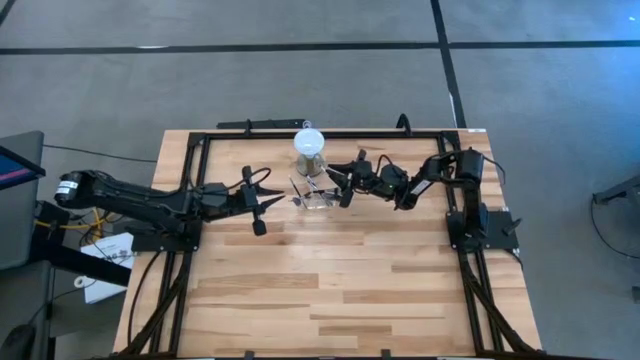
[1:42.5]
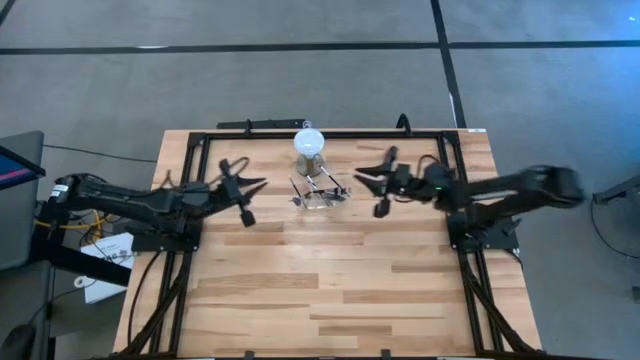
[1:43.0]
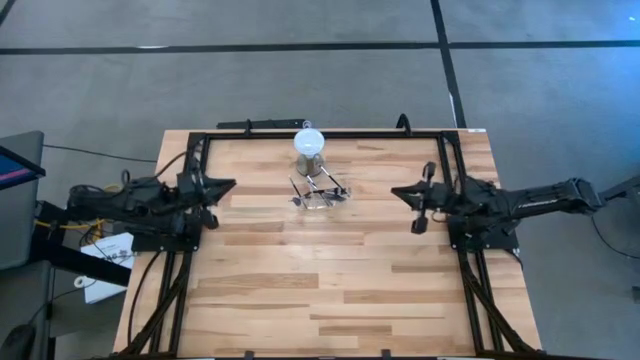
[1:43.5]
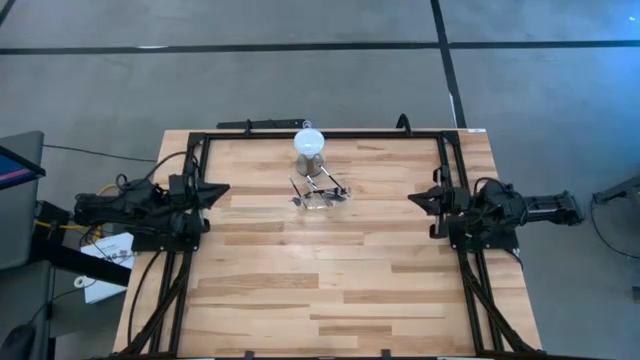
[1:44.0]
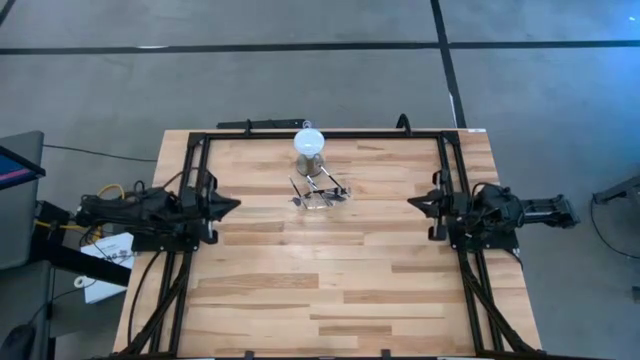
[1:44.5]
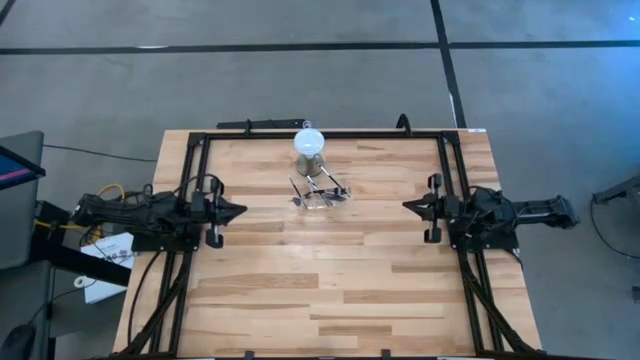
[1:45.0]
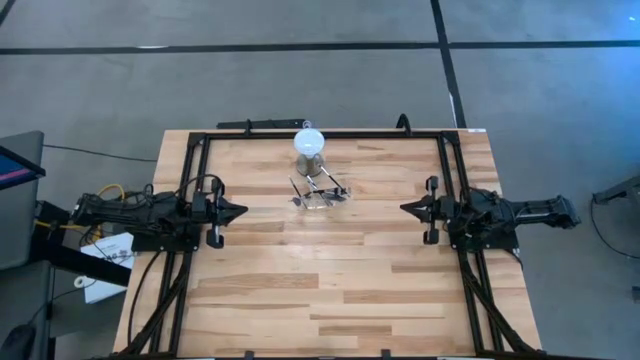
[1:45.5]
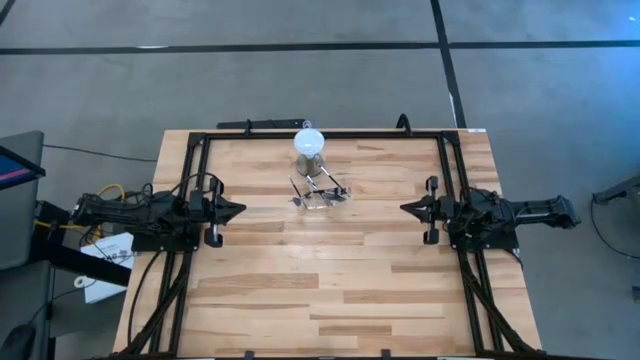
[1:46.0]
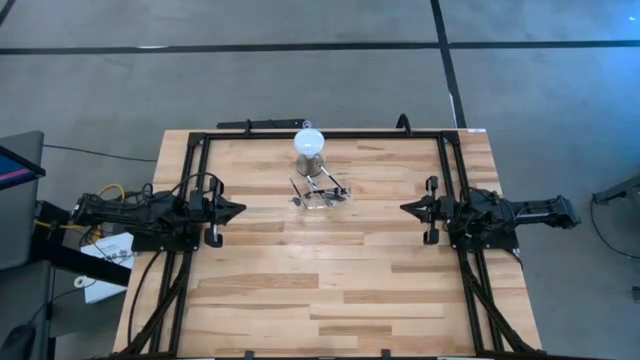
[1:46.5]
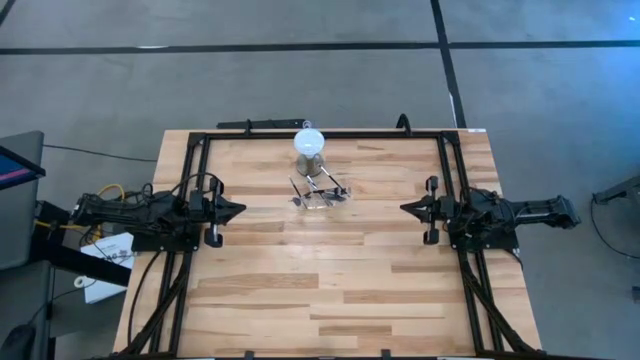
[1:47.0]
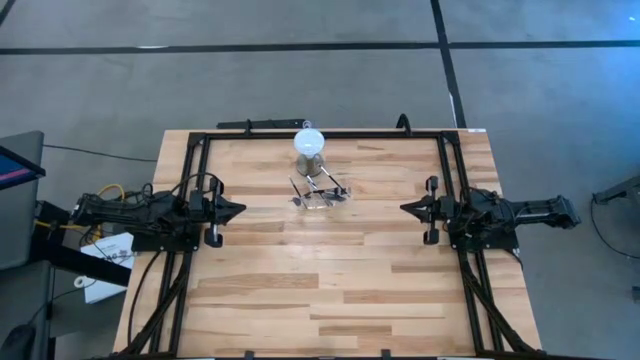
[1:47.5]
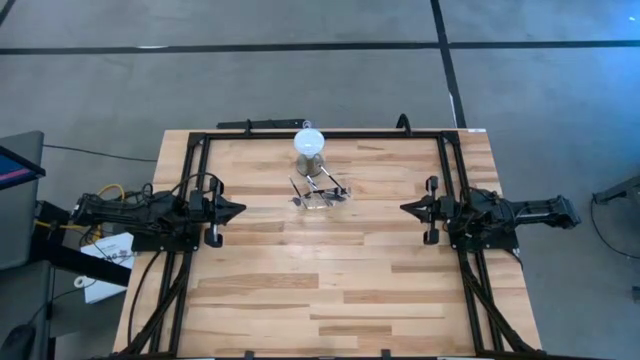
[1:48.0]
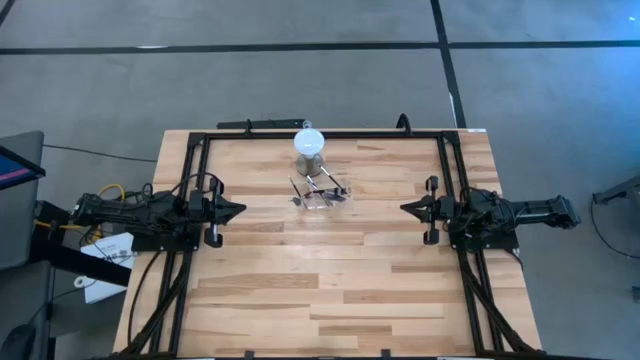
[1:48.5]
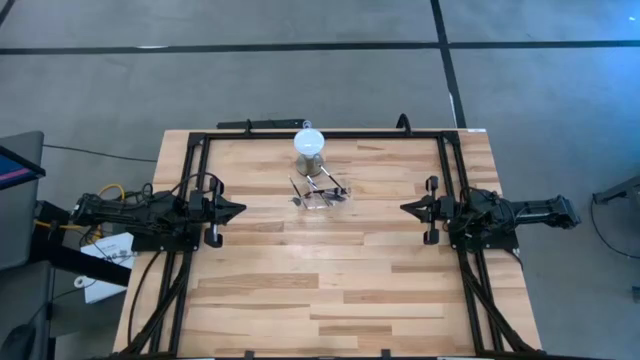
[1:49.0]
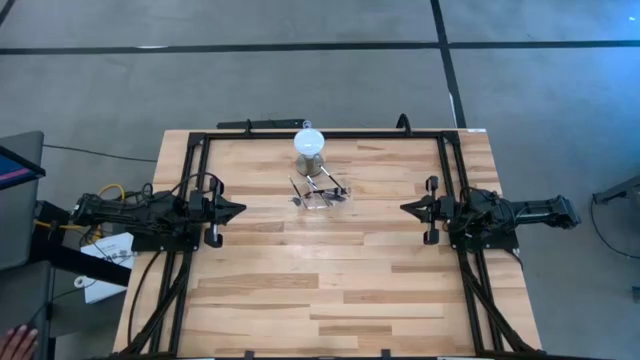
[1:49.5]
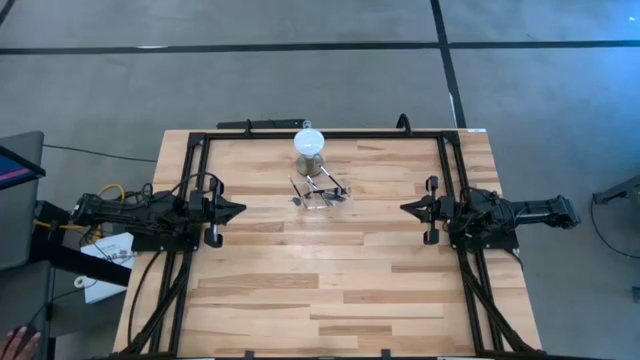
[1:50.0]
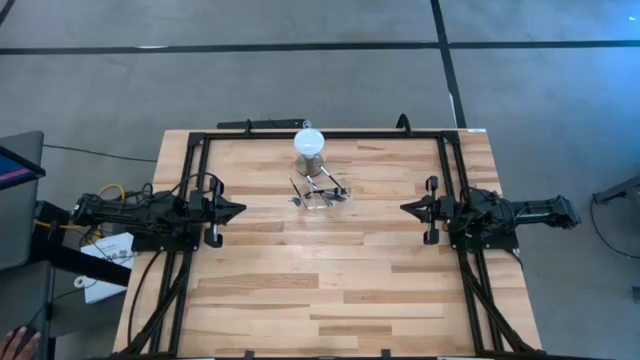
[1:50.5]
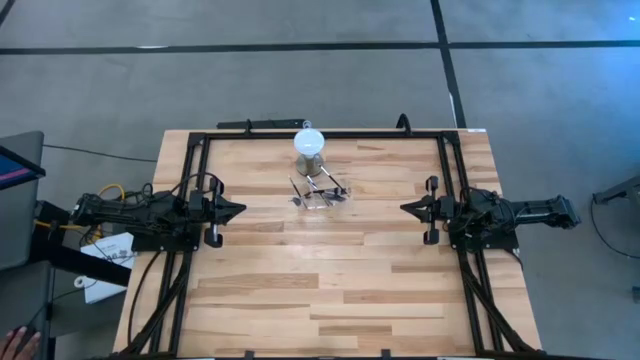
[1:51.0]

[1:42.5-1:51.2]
Task: Put items in baskets/containers
Return to Home Position

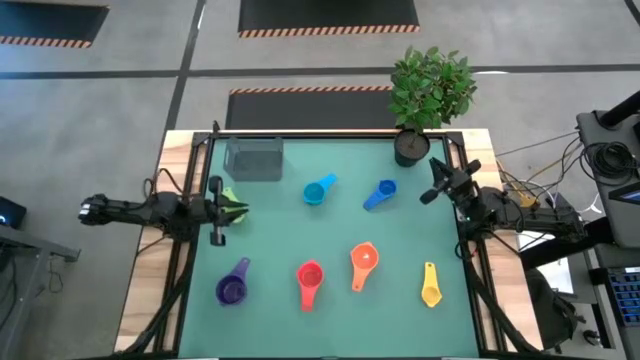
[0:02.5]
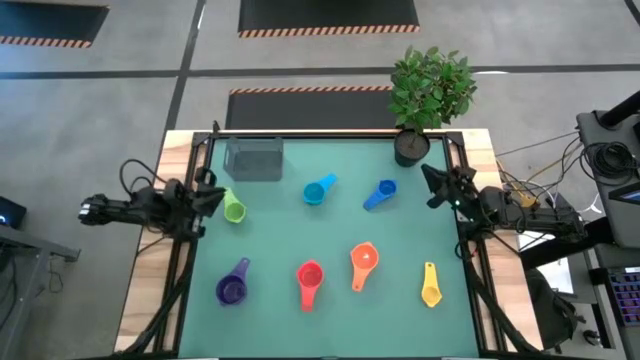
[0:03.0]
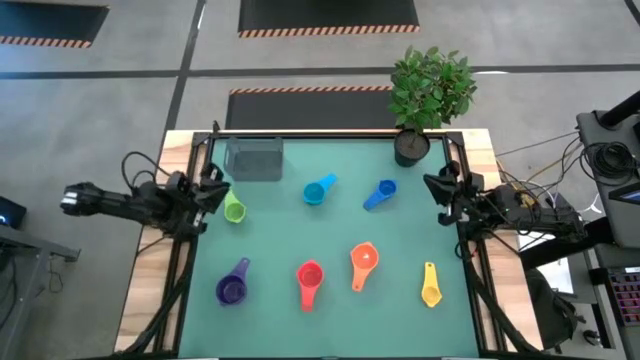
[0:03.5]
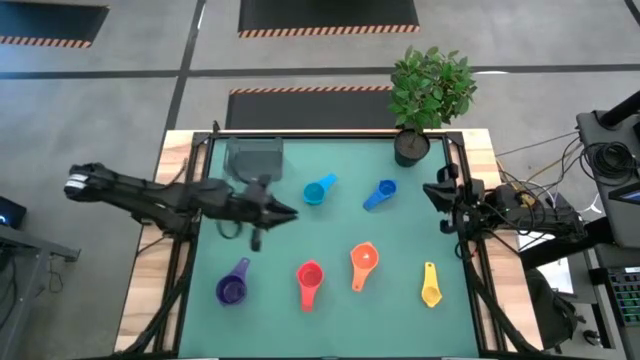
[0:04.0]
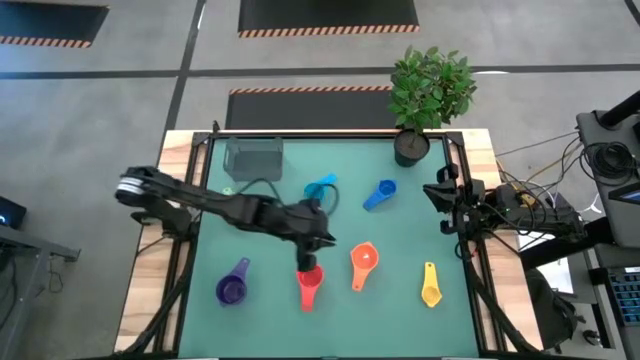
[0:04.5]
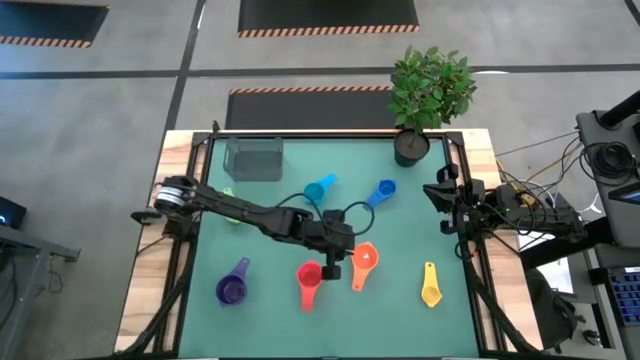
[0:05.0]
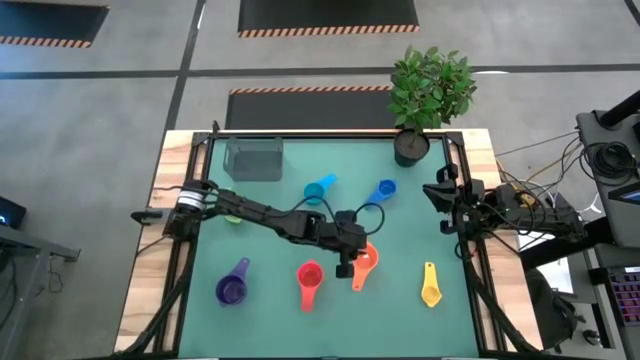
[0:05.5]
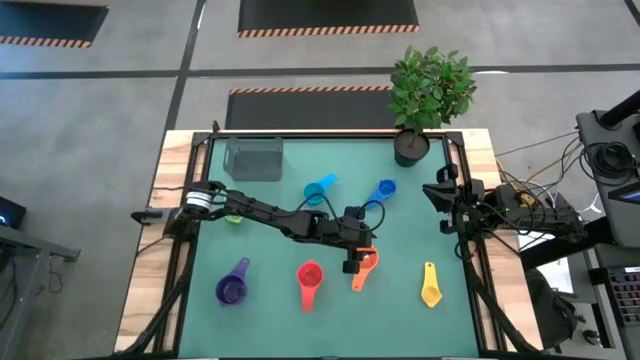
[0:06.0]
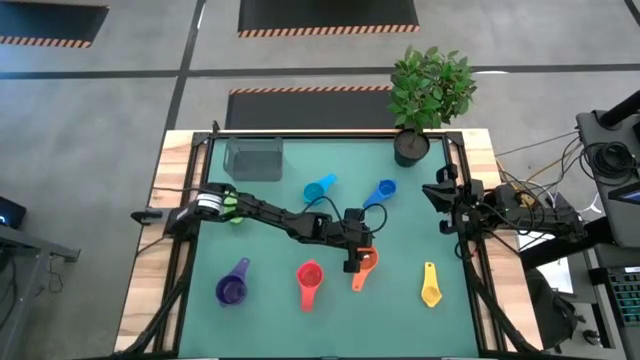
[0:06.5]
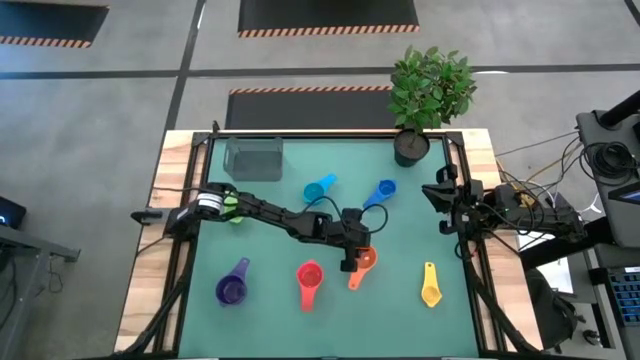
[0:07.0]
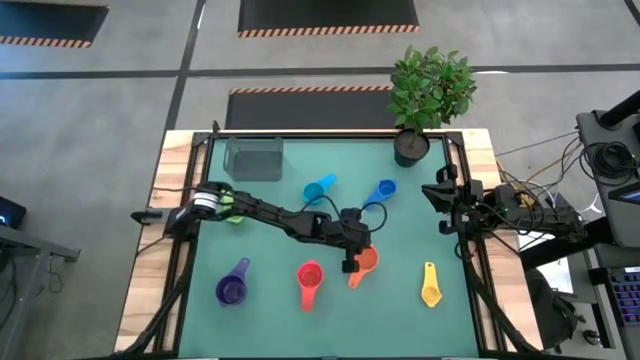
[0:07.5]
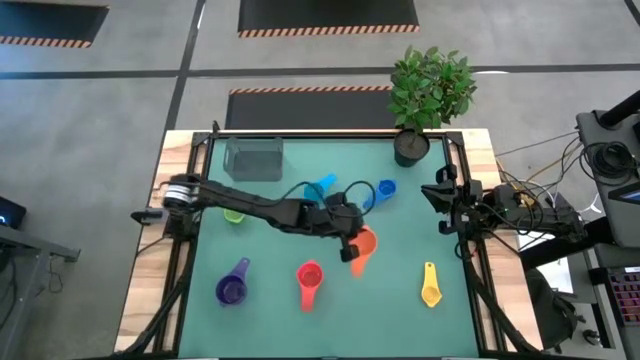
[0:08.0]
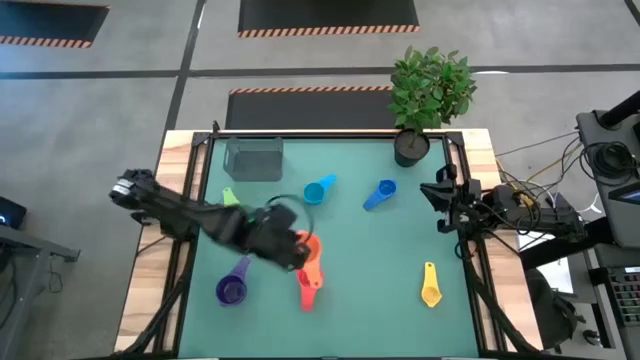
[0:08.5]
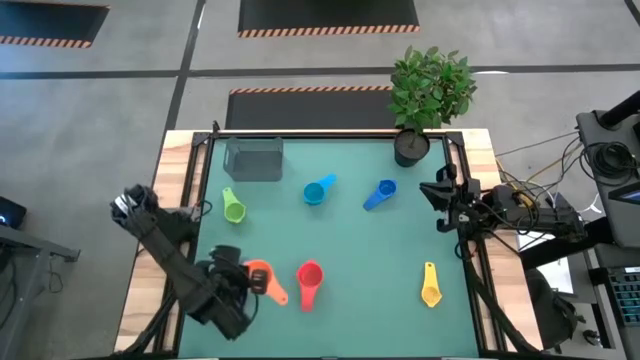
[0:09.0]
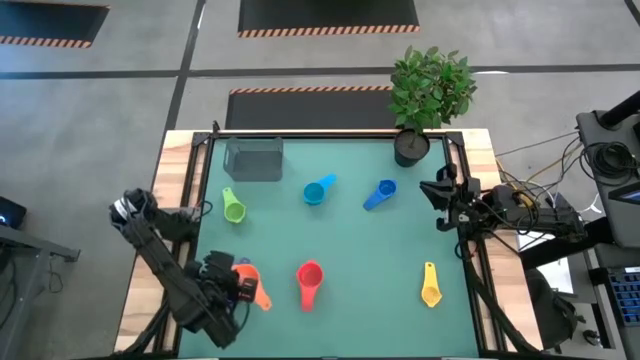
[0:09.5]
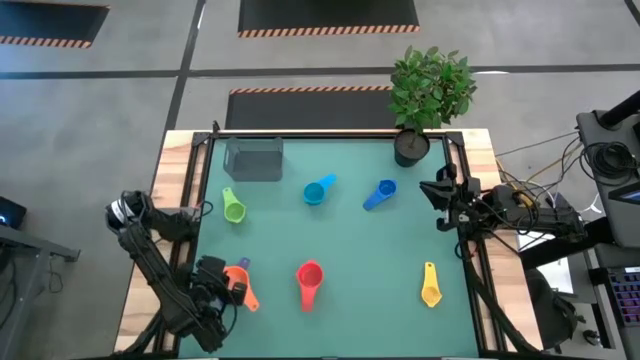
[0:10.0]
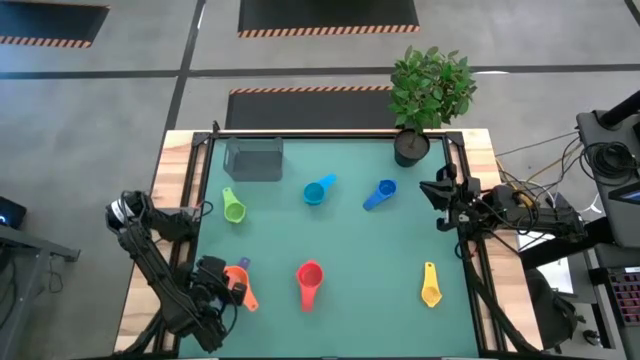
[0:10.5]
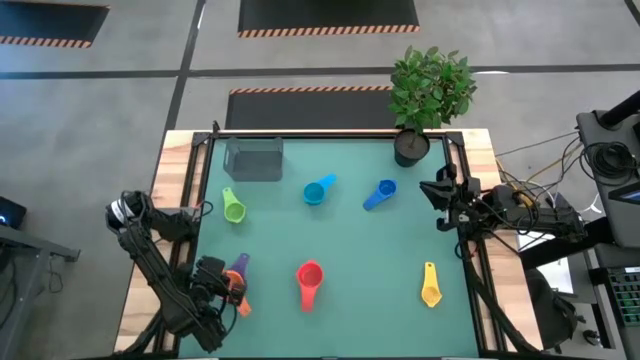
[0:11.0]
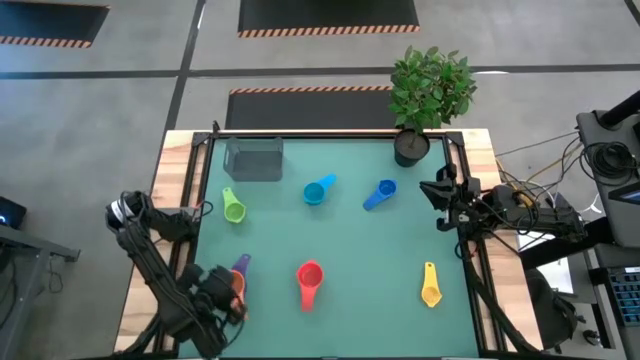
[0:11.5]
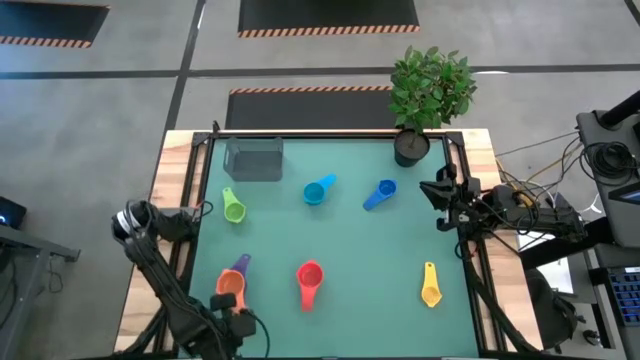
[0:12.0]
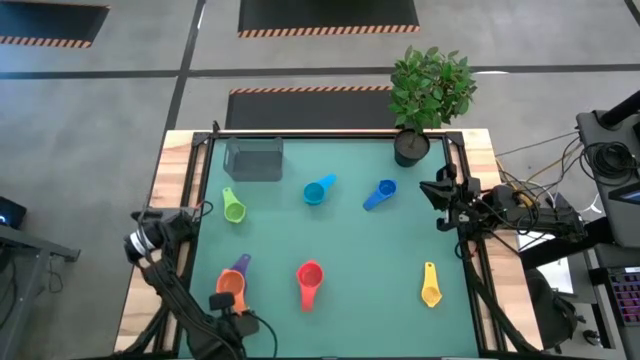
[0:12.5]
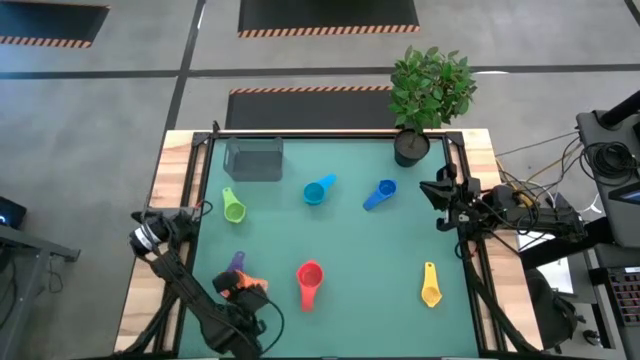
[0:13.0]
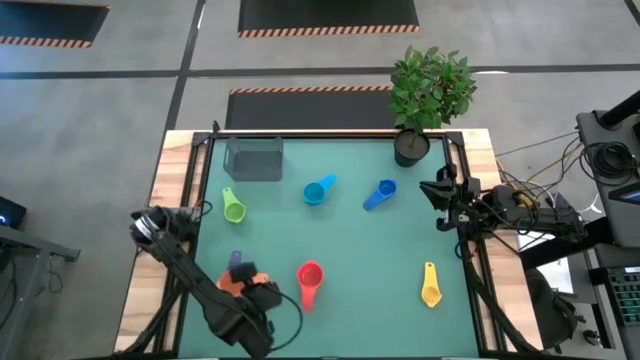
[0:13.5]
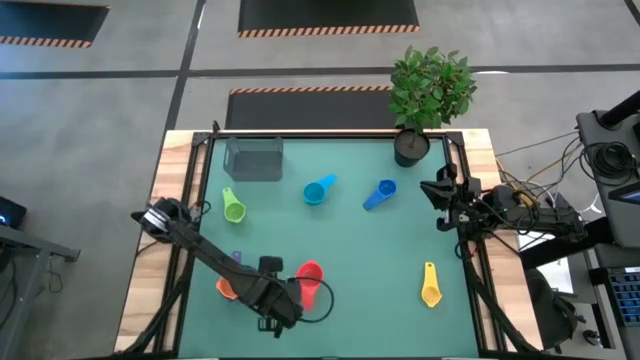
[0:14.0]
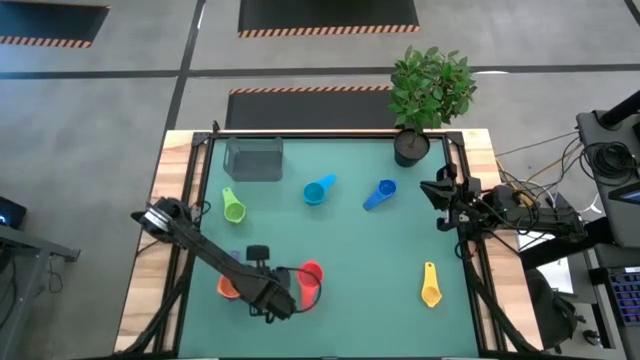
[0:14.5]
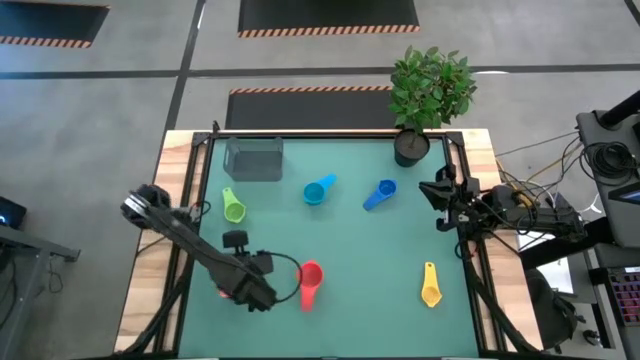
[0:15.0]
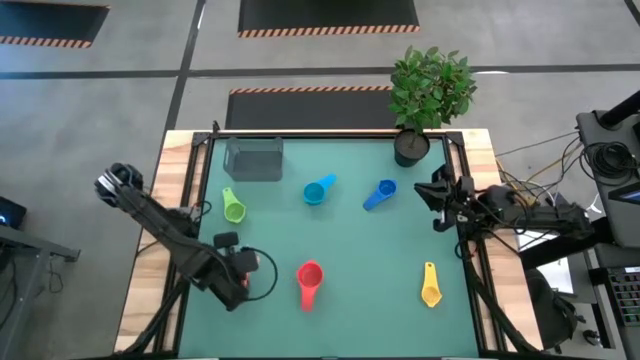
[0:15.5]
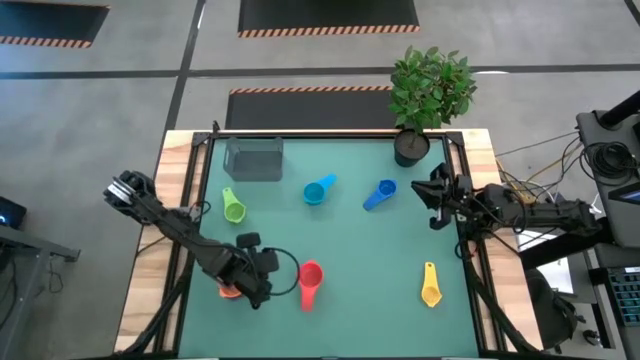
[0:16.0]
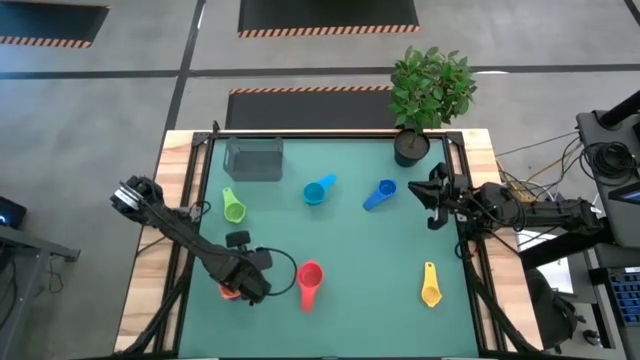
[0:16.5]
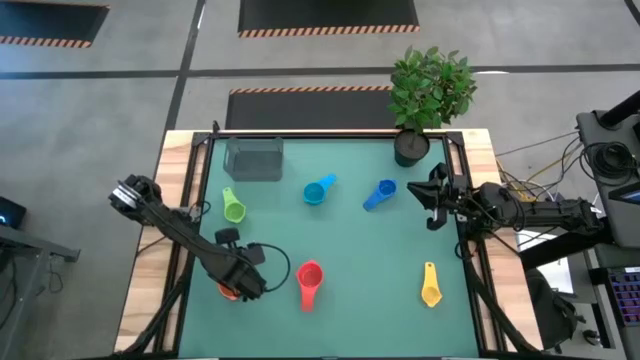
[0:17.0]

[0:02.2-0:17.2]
Task: Nest measuring cups in basket
Stack the orange measuring cup on top of the violet measuring cup
